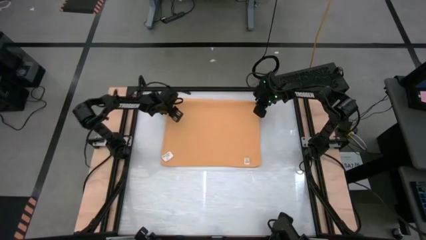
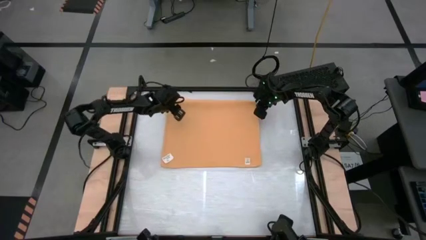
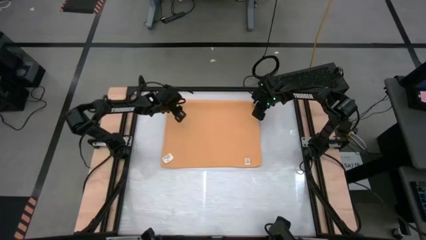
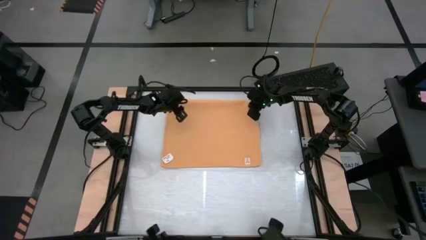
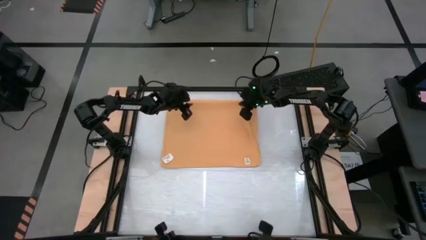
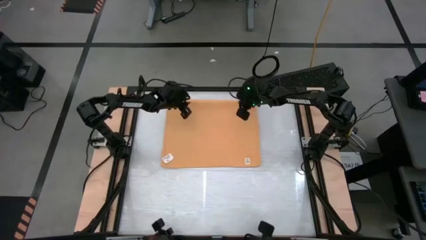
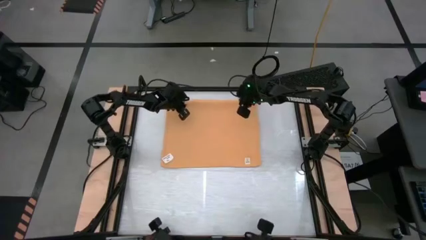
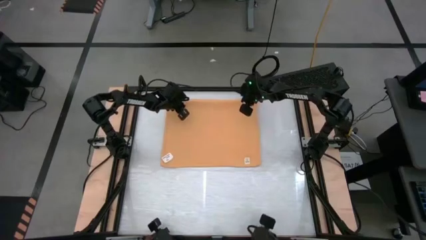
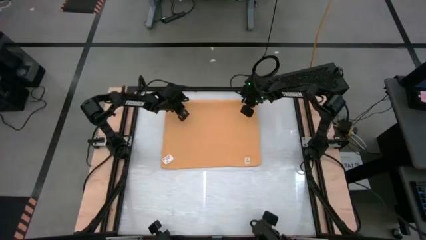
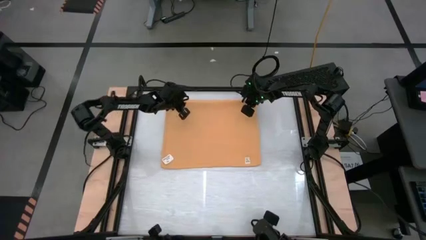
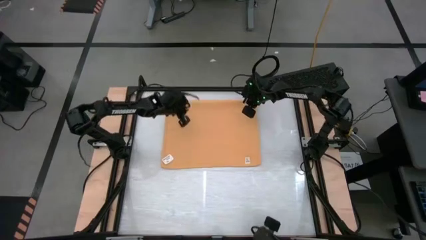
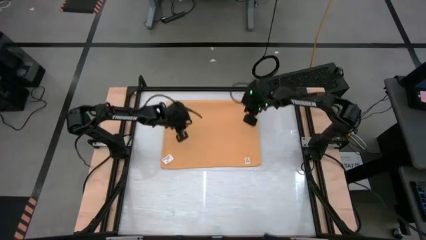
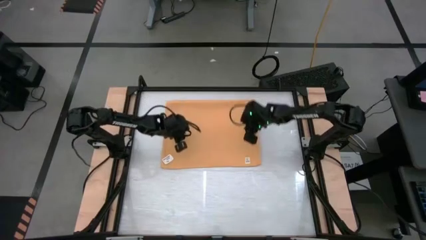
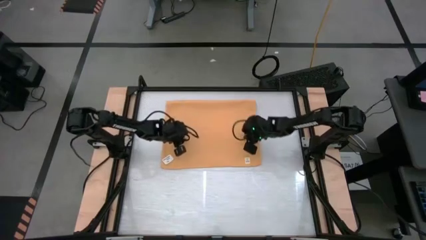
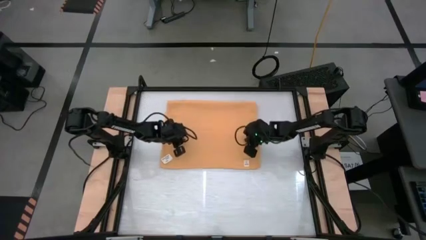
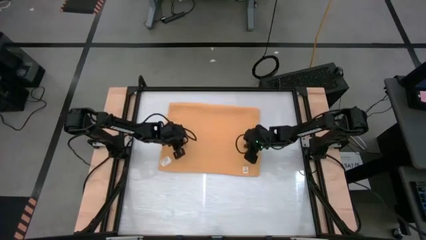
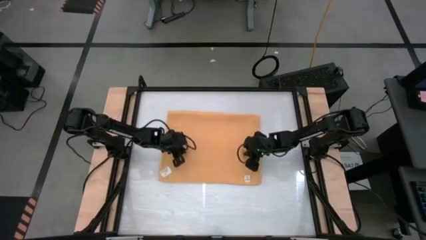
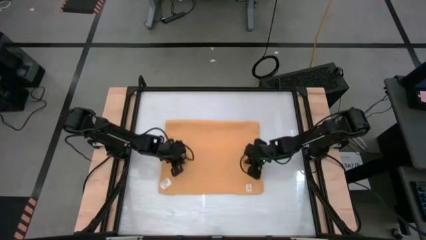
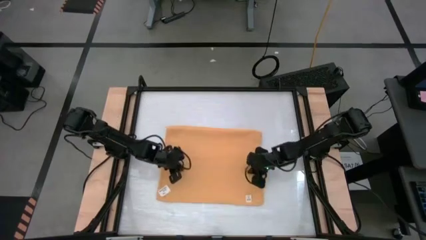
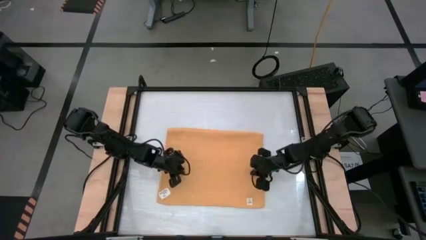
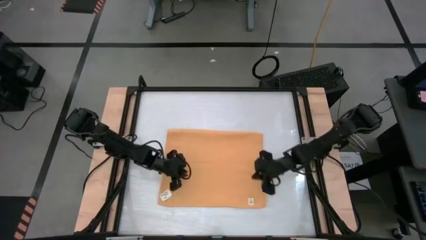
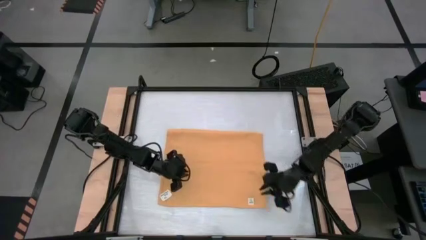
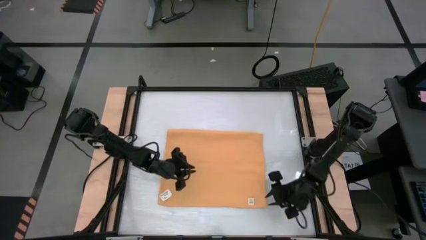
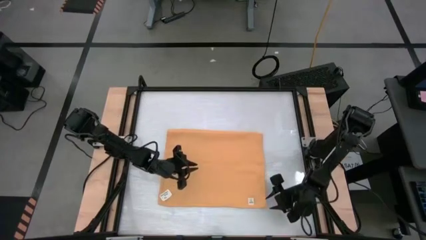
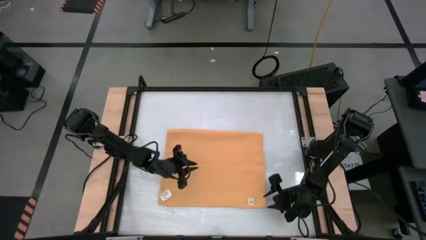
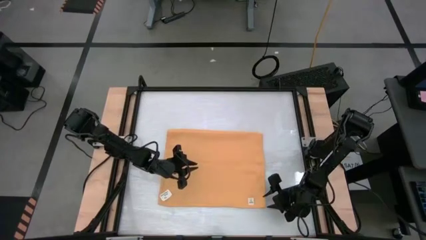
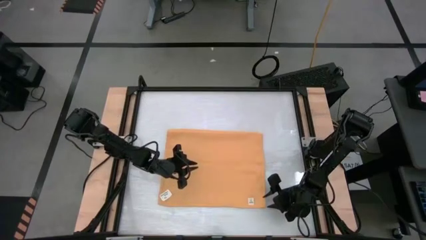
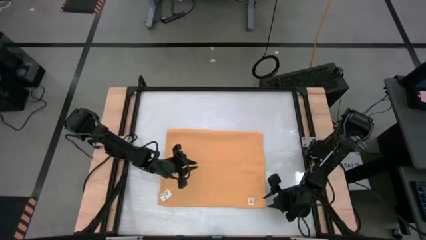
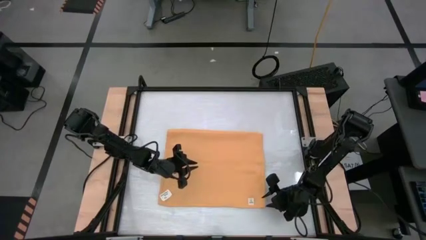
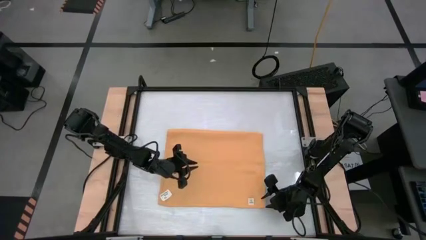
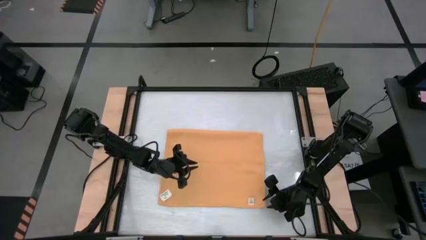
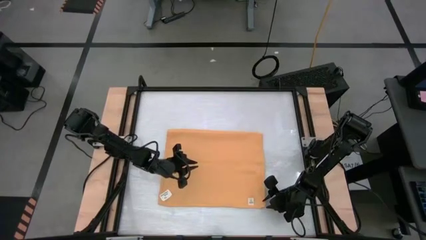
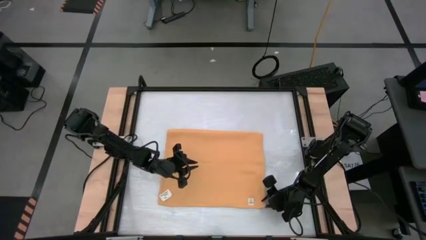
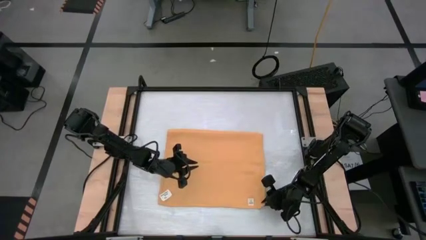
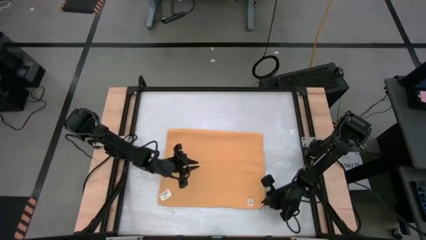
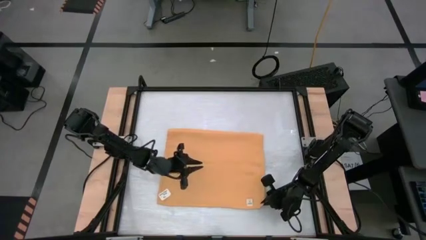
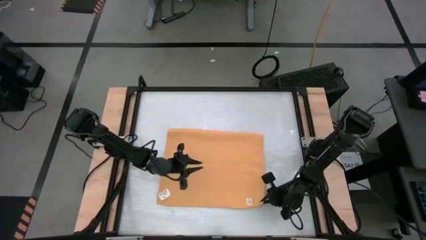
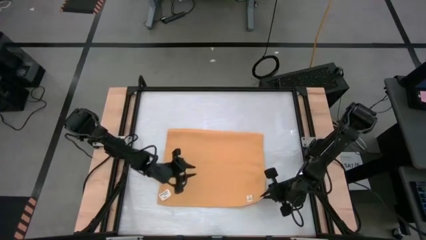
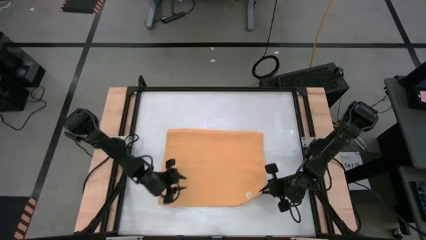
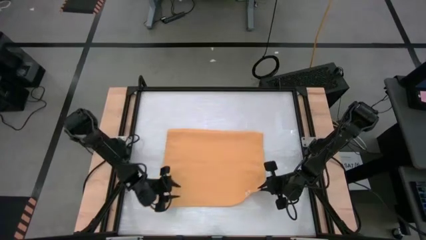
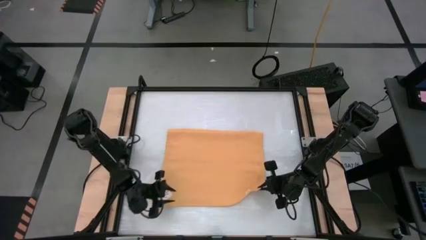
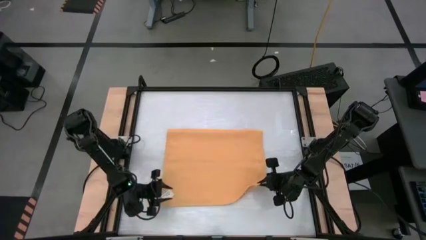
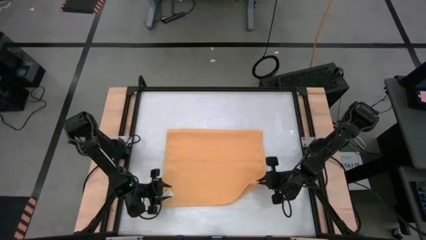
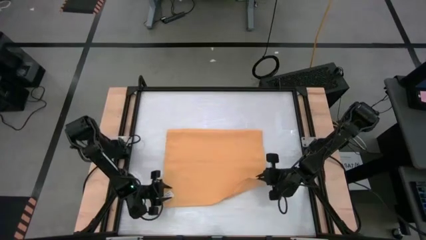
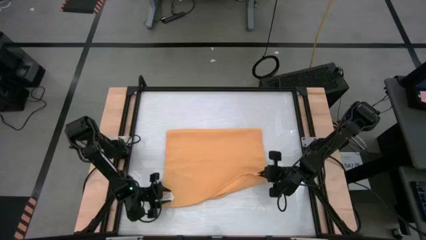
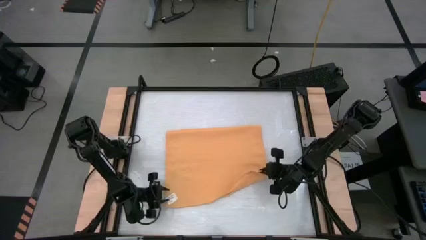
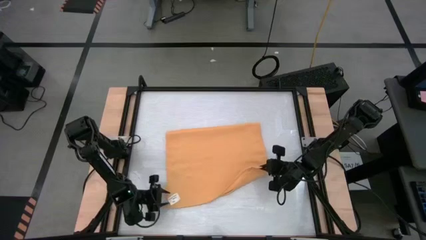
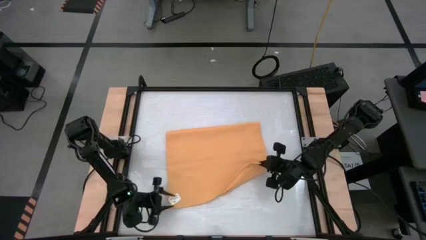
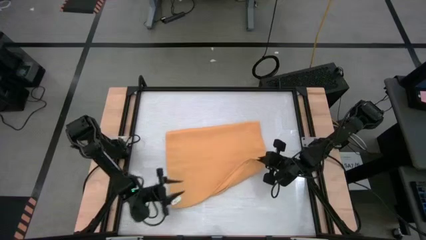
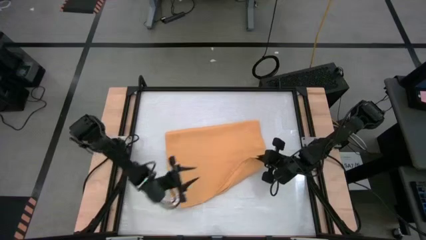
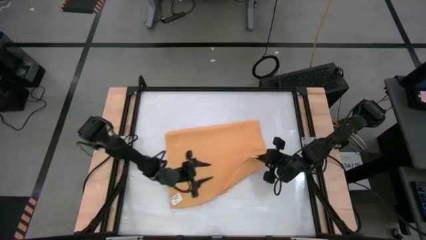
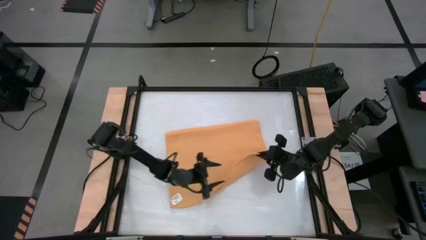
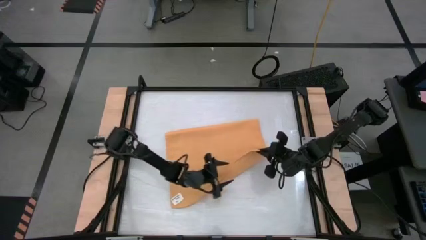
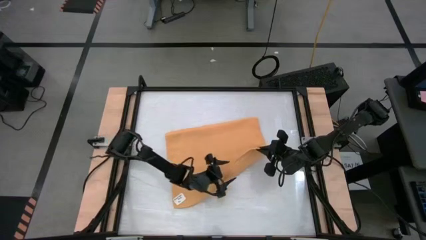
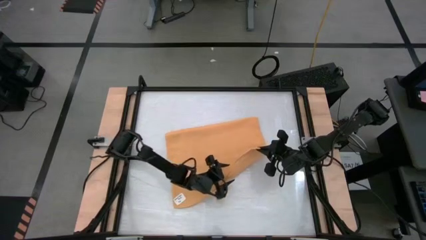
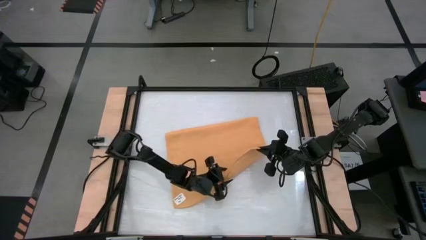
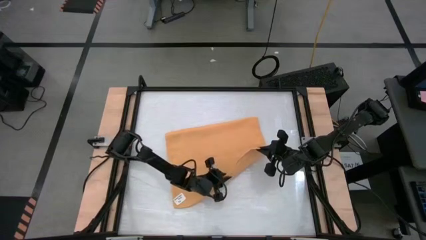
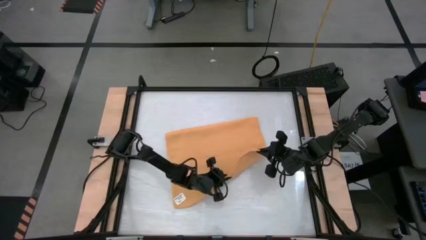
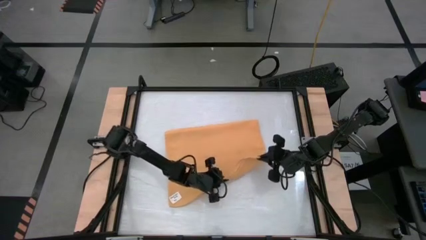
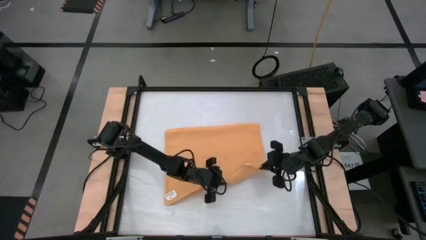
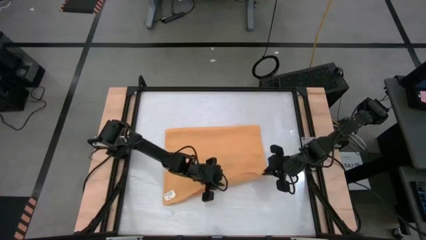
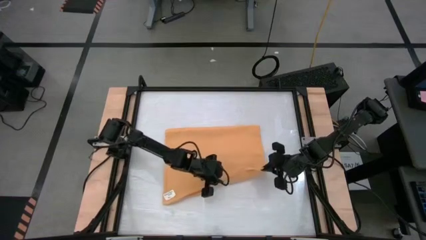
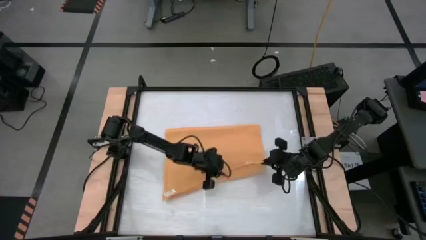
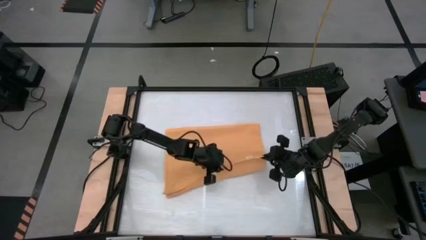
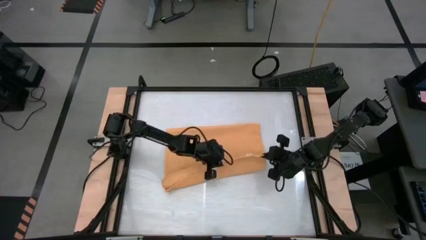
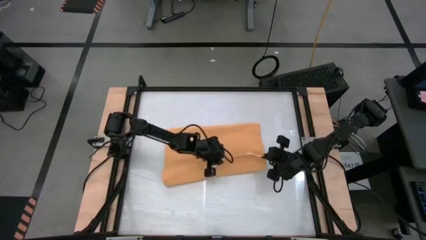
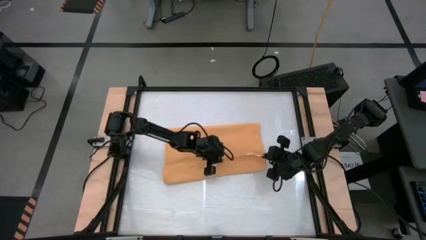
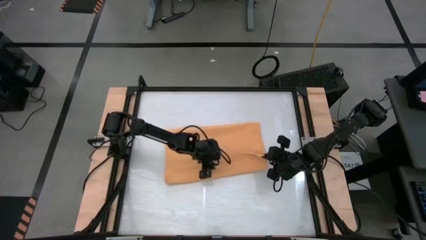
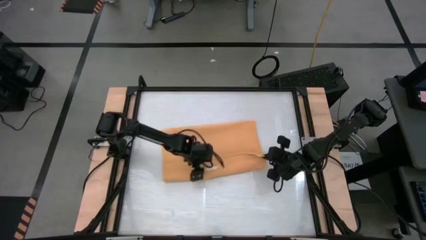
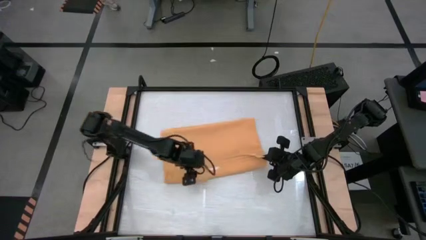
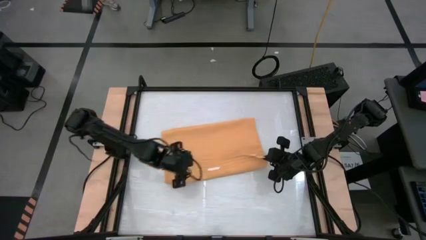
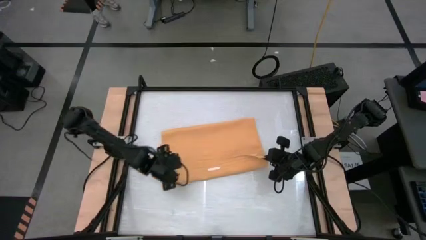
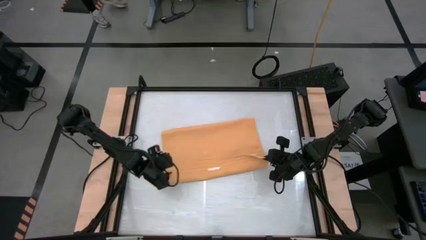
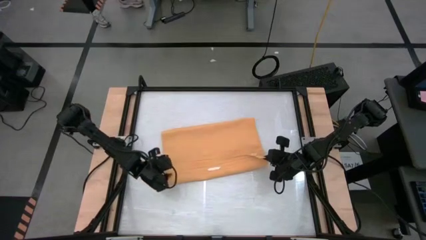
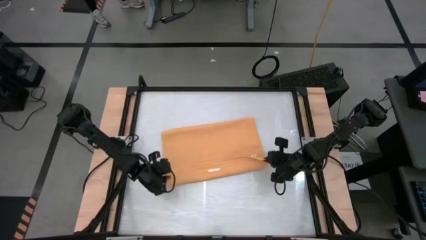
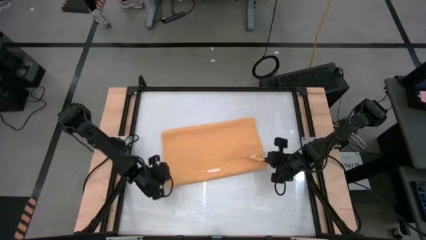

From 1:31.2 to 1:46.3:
Task: Roll towel
Roll the yellow towel

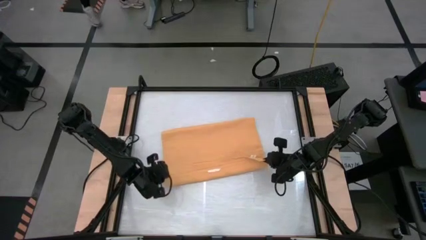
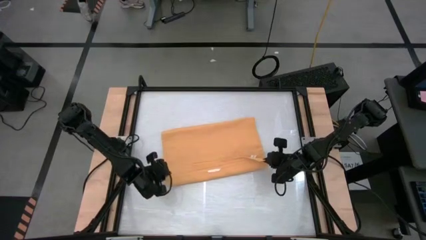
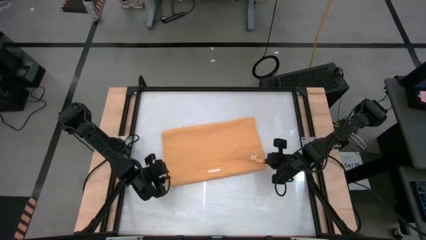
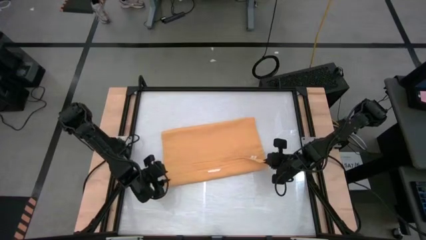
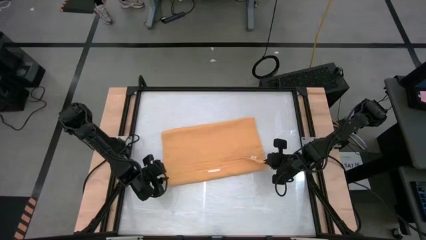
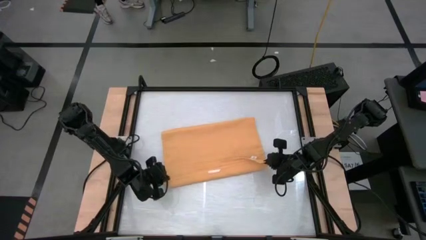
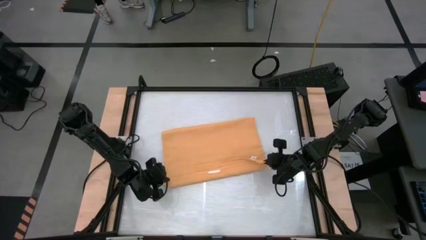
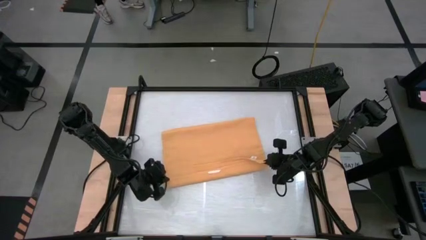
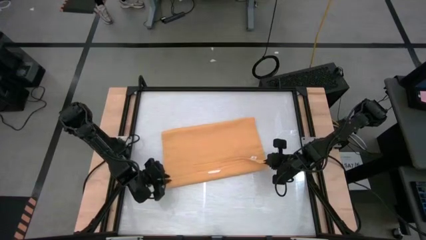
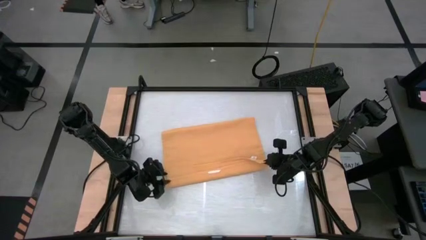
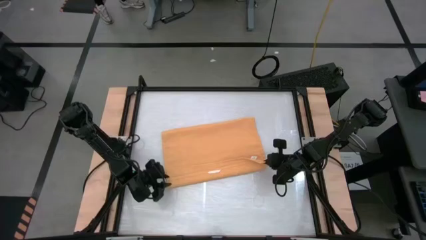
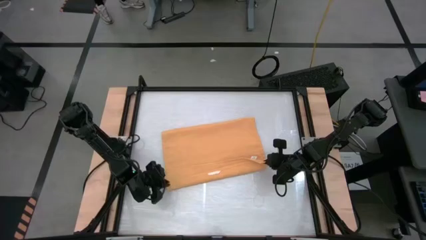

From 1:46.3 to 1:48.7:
Roll the yellow towel
